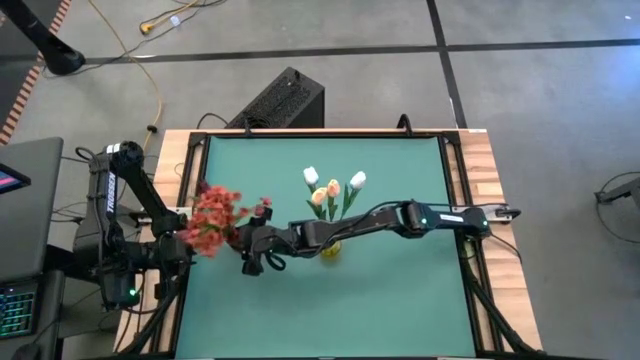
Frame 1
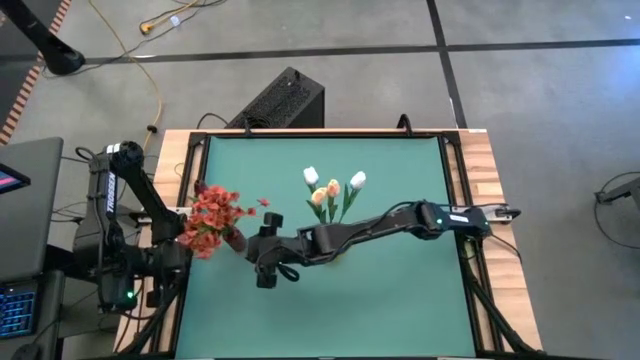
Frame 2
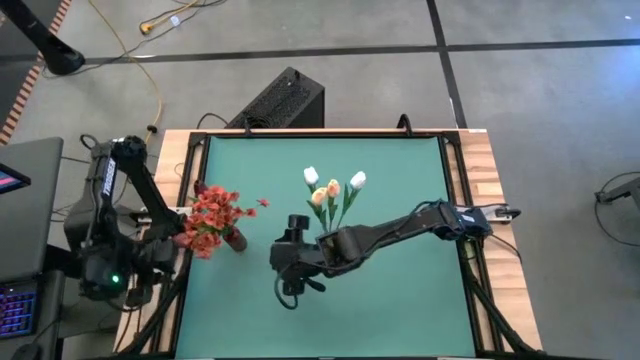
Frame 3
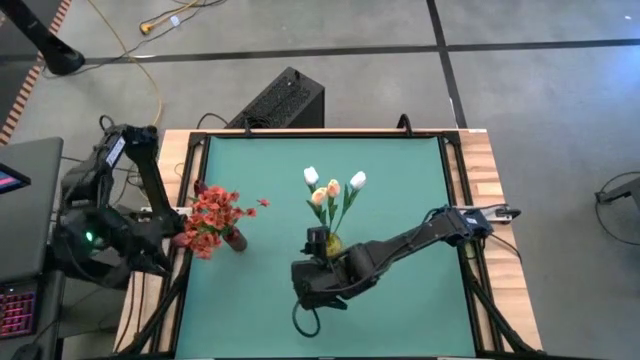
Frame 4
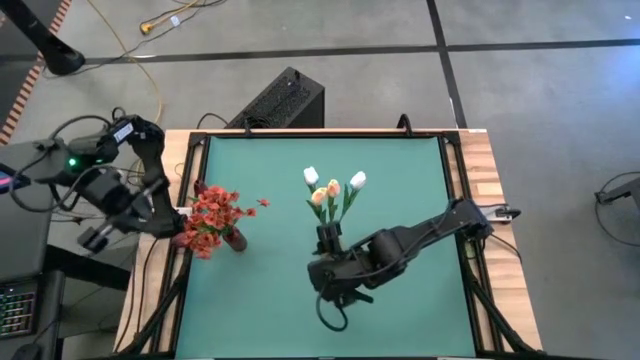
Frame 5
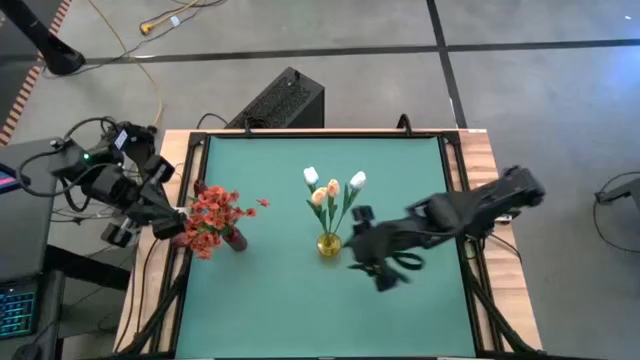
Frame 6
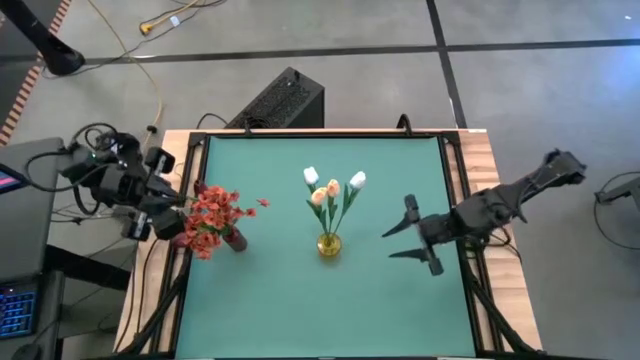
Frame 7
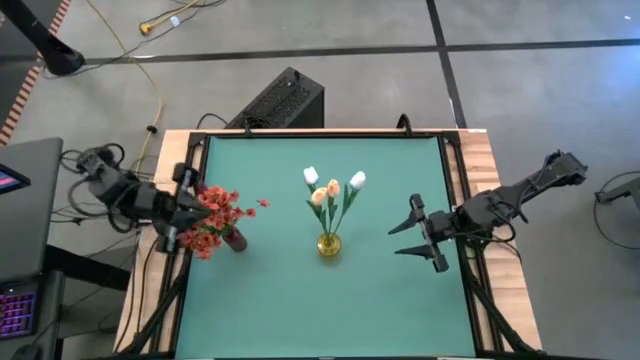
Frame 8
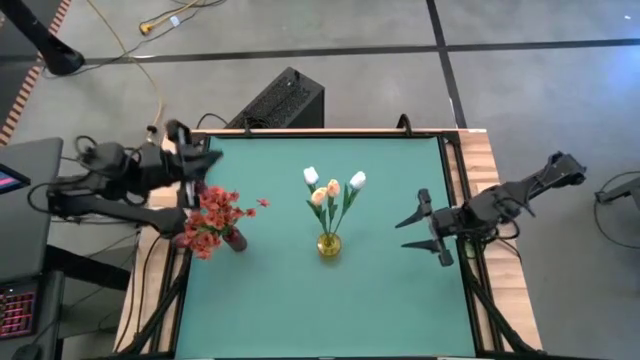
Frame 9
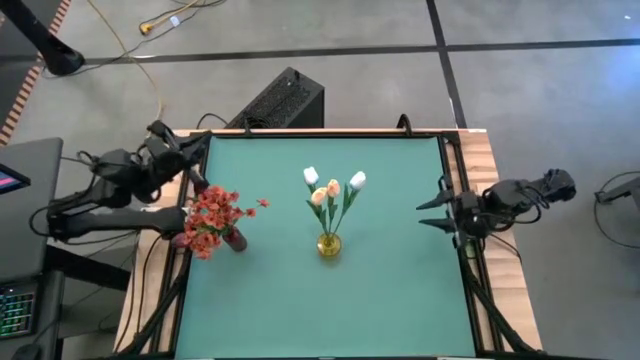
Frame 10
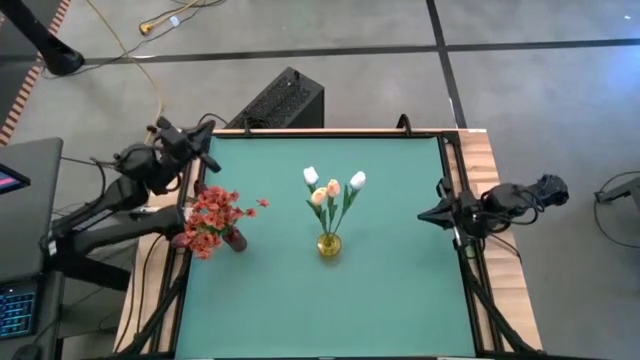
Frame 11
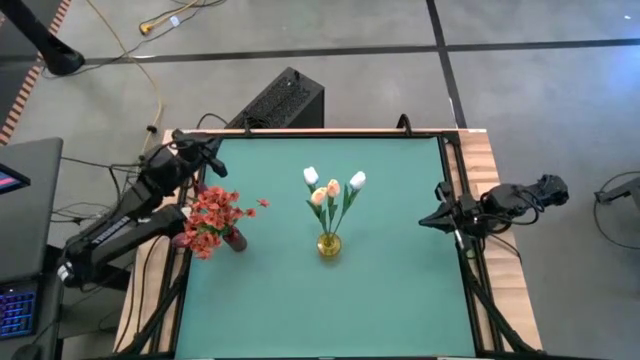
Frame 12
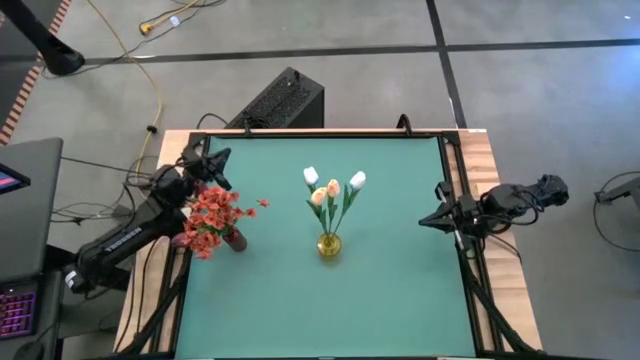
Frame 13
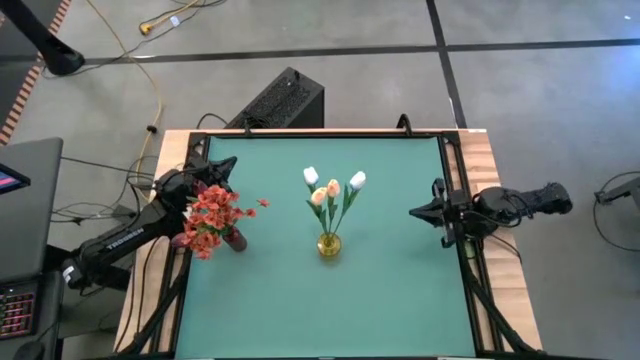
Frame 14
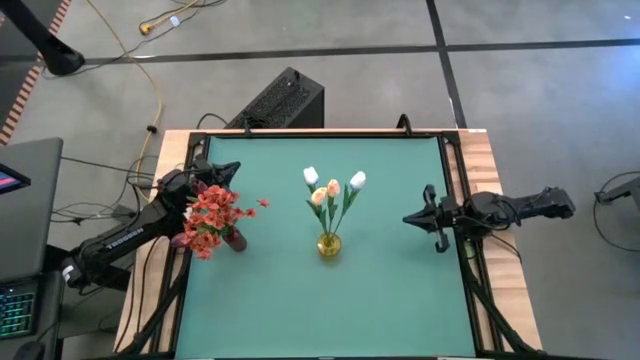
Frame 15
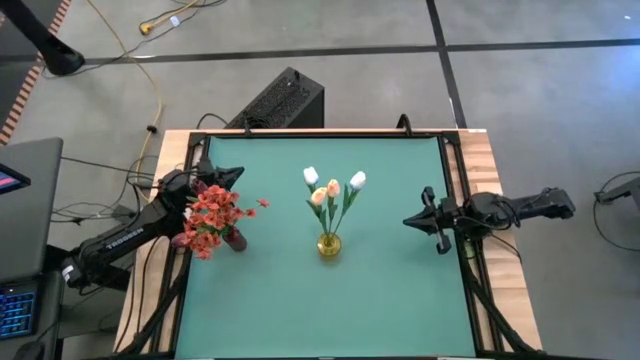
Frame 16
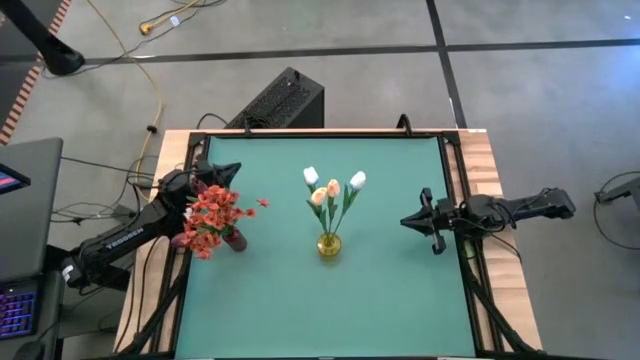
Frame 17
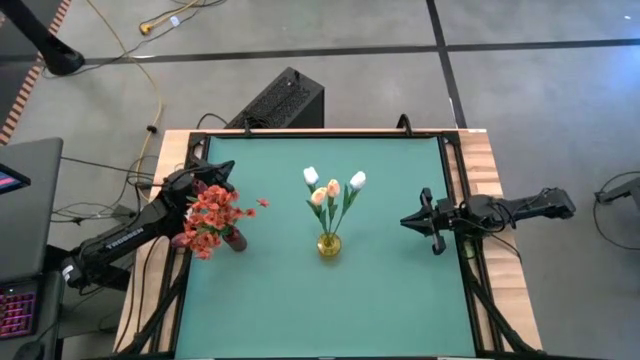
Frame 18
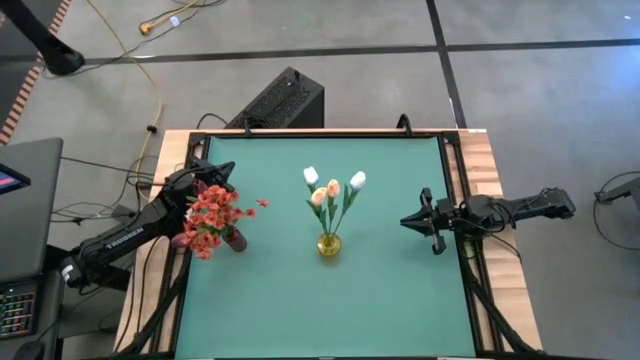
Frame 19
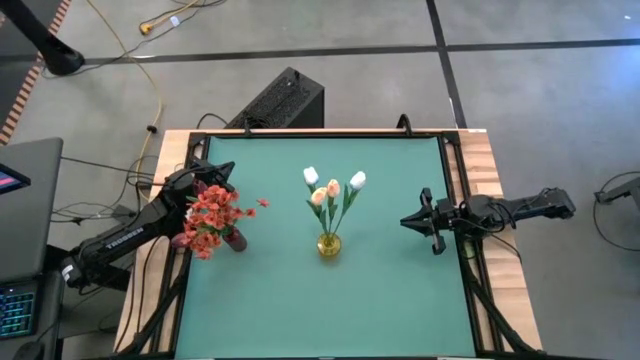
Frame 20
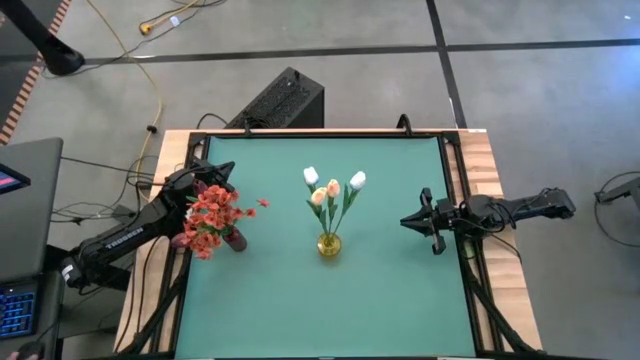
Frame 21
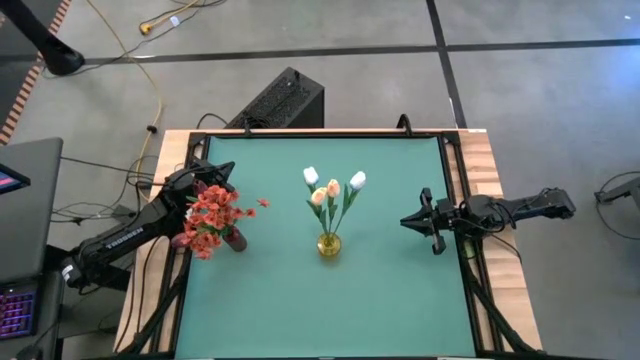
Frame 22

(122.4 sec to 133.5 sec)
Task: Sort flowers into vase by color
Return to Home Position

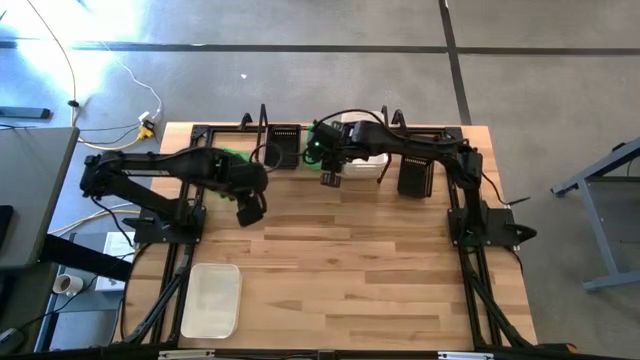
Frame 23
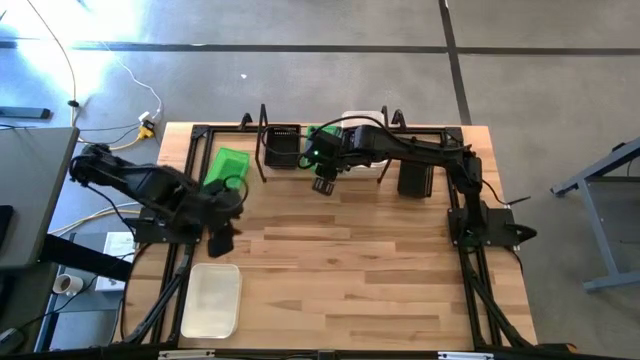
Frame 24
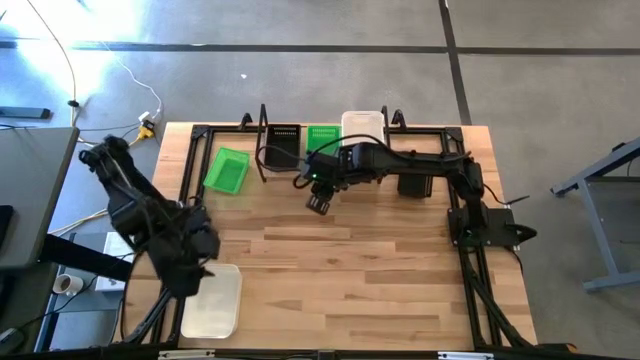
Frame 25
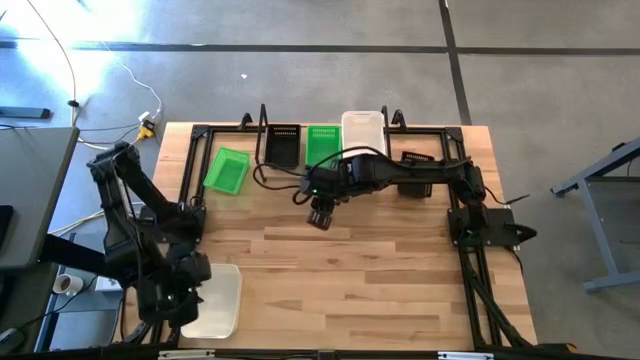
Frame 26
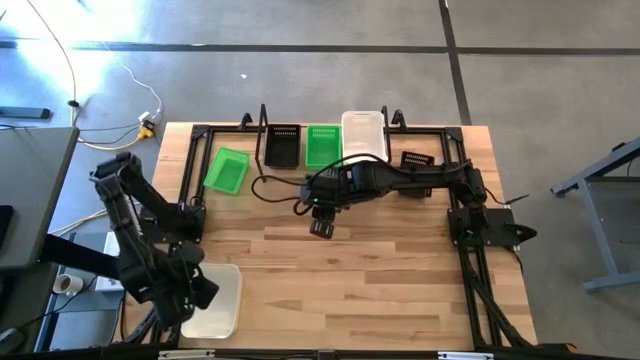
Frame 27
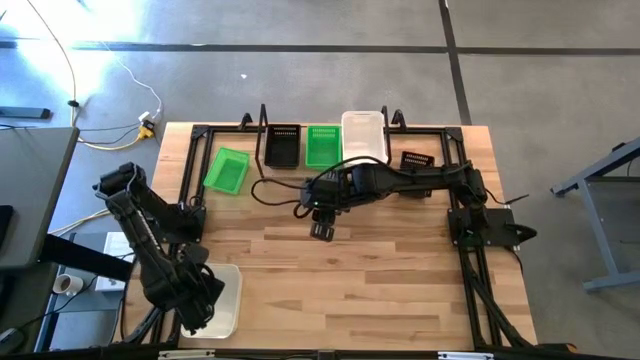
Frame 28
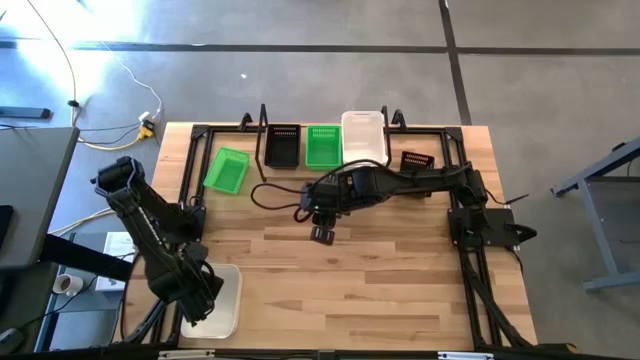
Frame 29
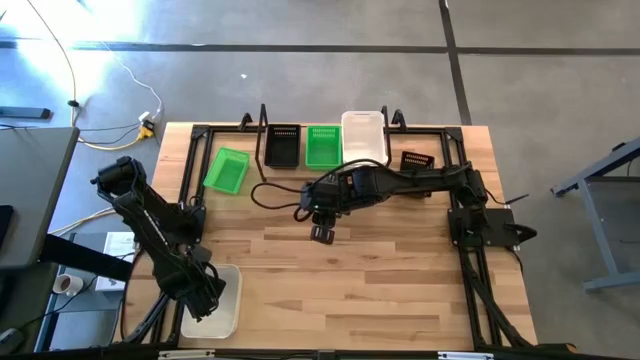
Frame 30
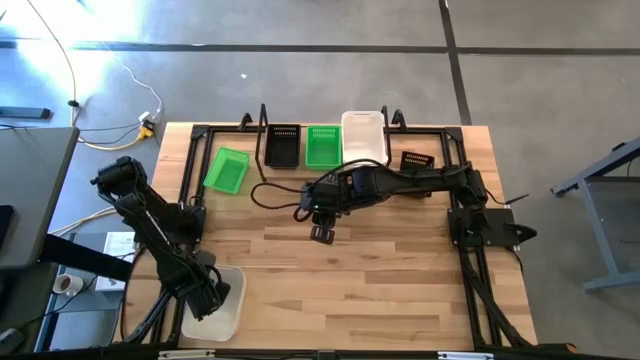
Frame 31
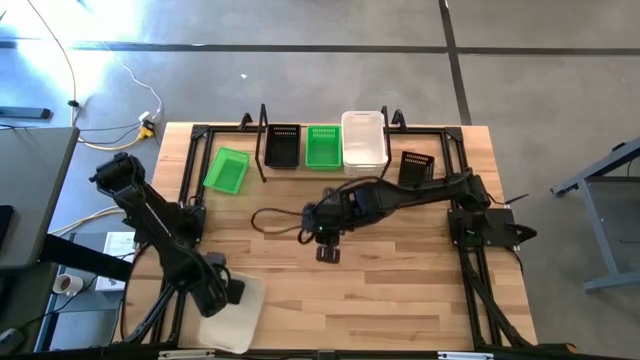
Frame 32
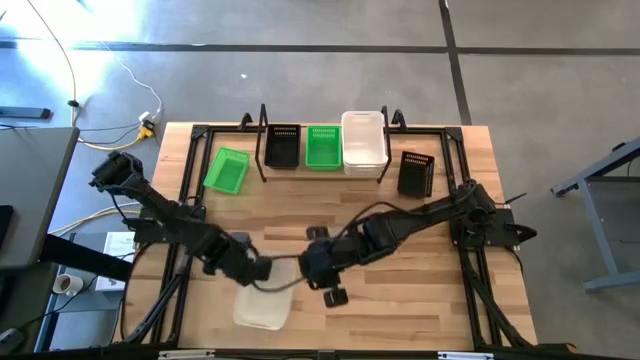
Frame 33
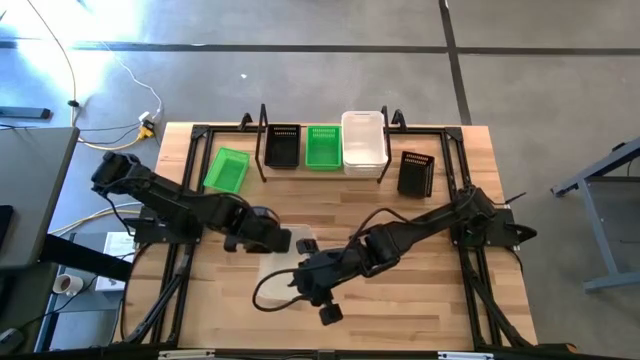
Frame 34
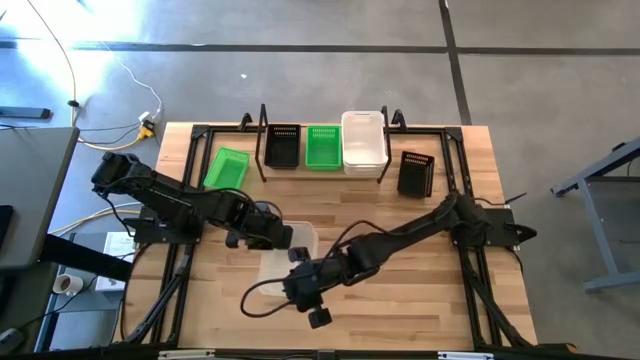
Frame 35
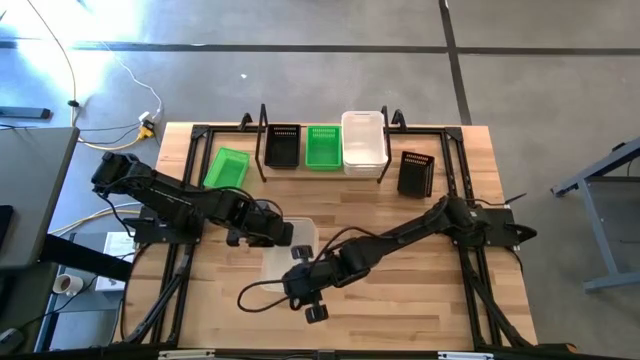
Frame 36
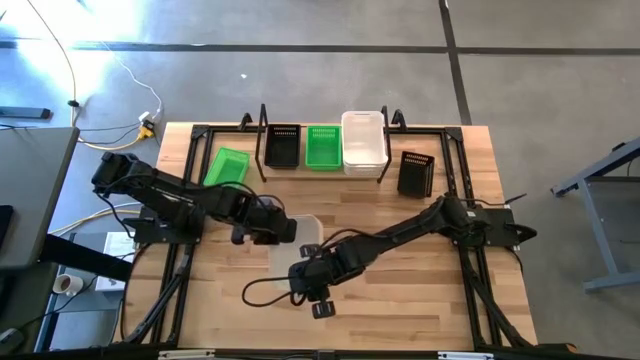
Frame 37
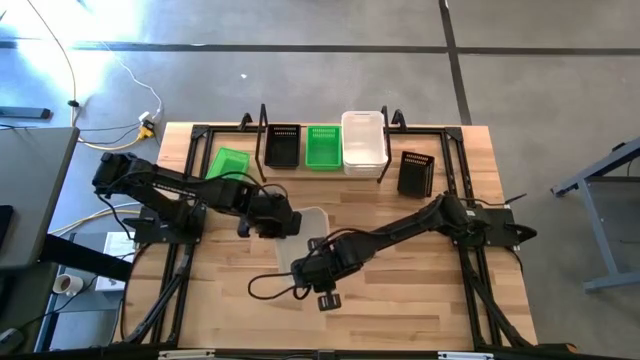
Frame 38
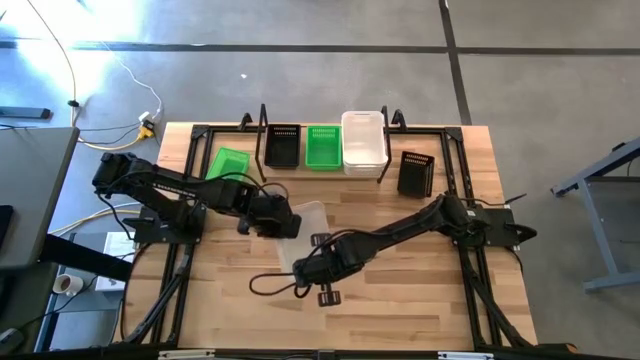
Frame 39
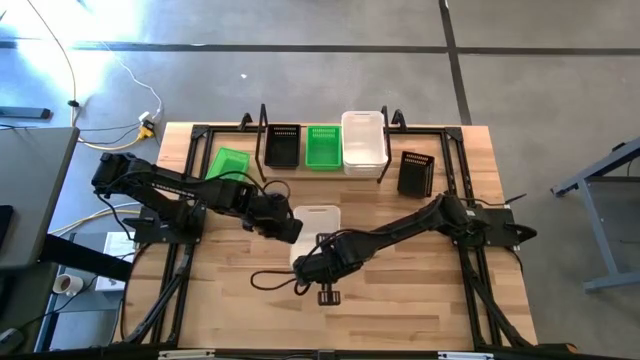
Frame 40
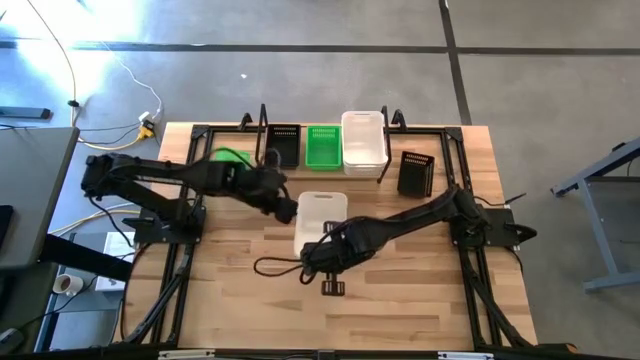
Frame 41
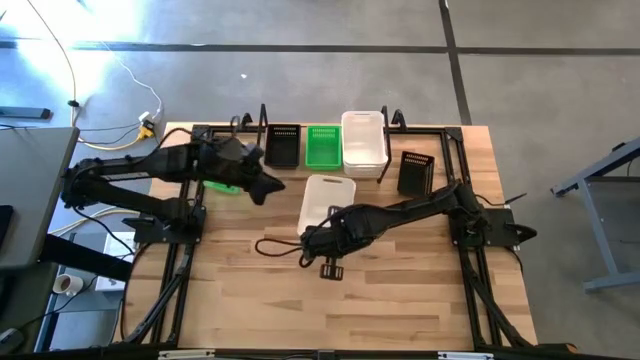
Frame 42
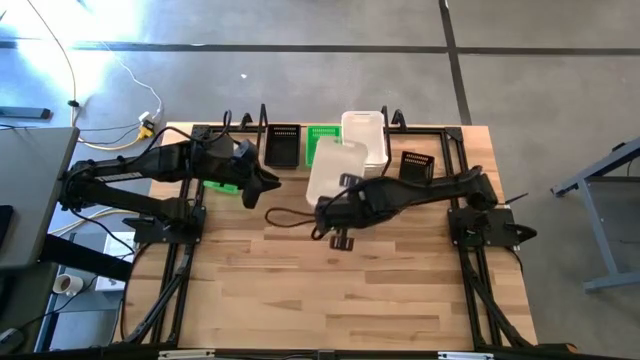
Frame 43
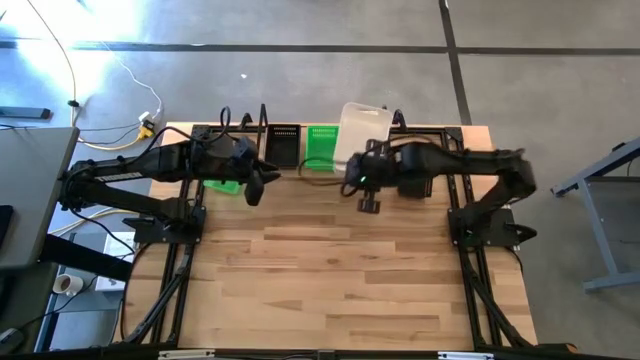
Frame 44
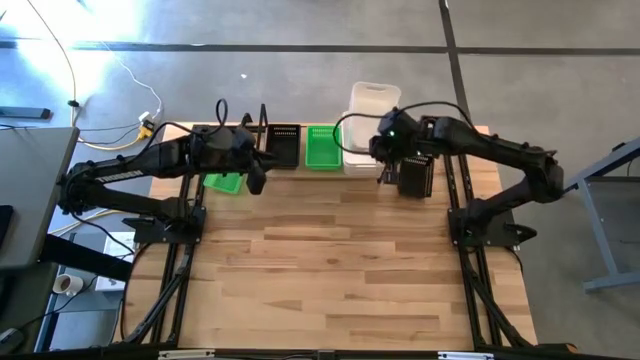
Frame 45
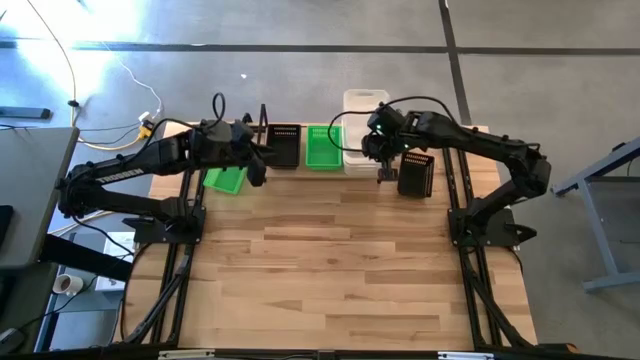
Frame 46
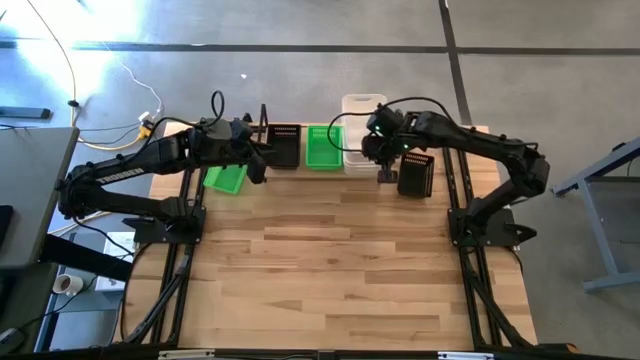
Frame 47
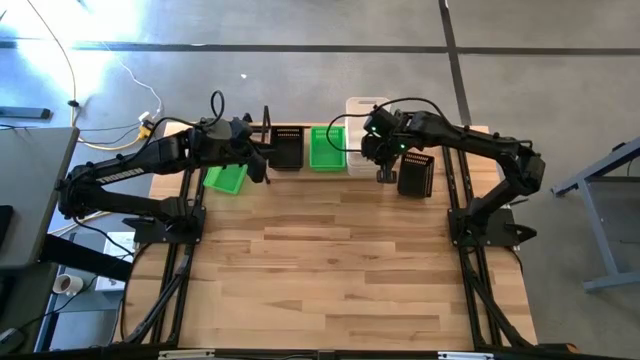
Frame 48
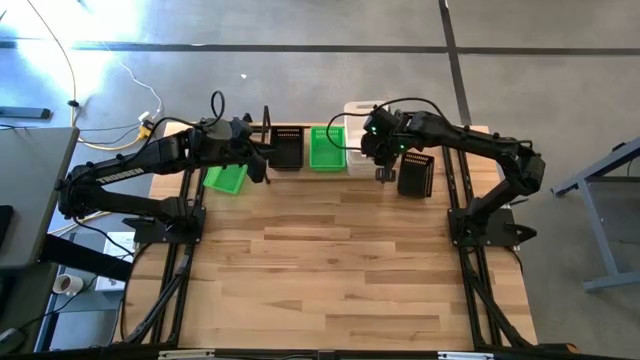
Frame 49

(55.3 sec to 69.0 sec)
Task: Stack baskets on shelf by color
Stack the white bin on the stacked white bins on the shelf
